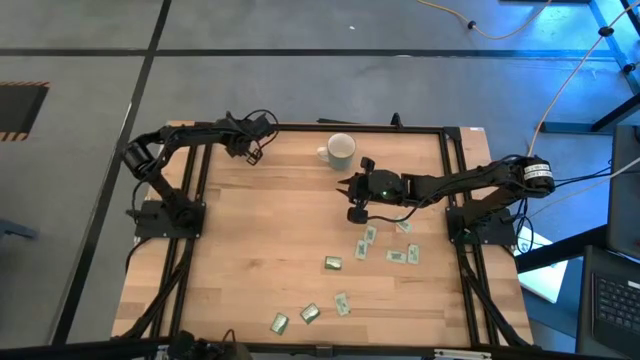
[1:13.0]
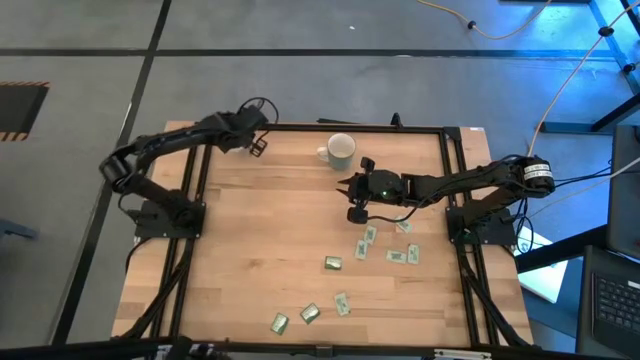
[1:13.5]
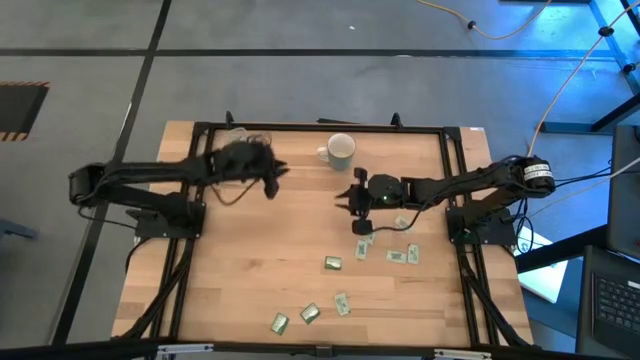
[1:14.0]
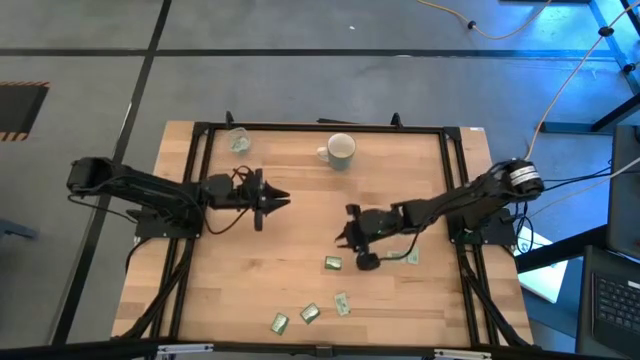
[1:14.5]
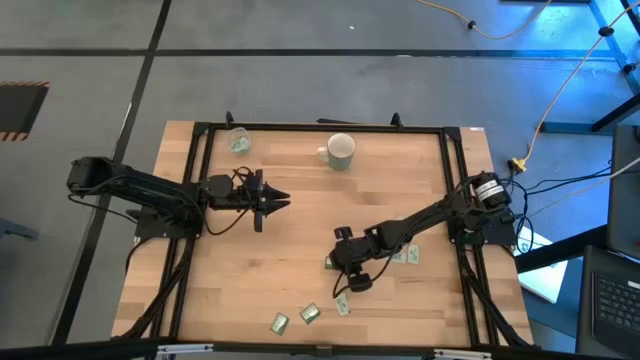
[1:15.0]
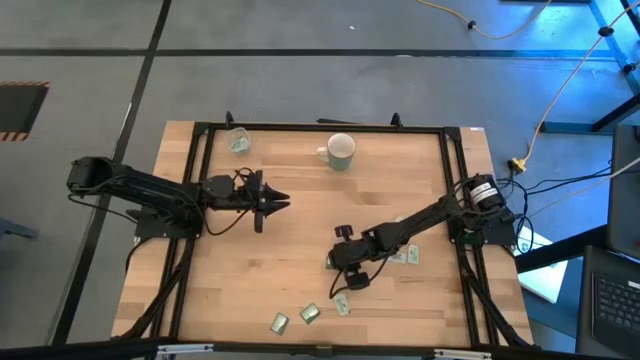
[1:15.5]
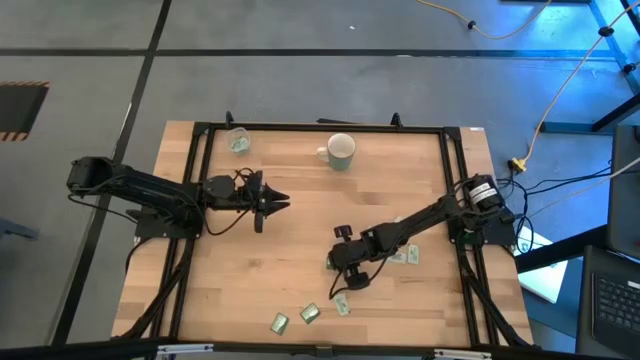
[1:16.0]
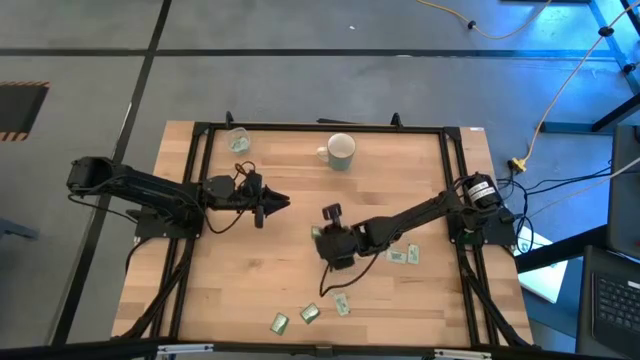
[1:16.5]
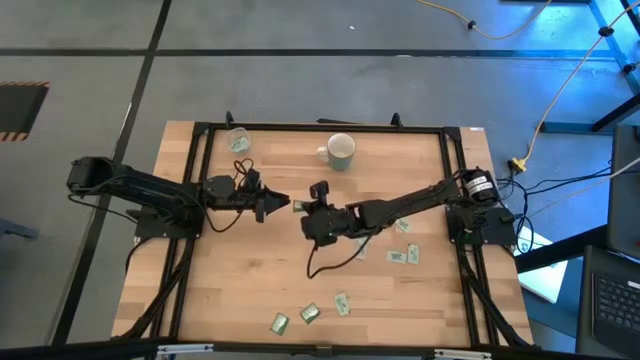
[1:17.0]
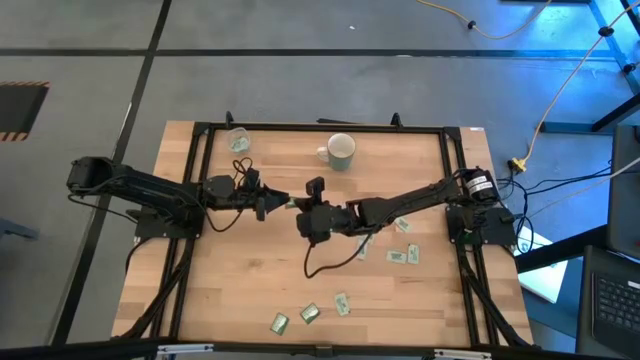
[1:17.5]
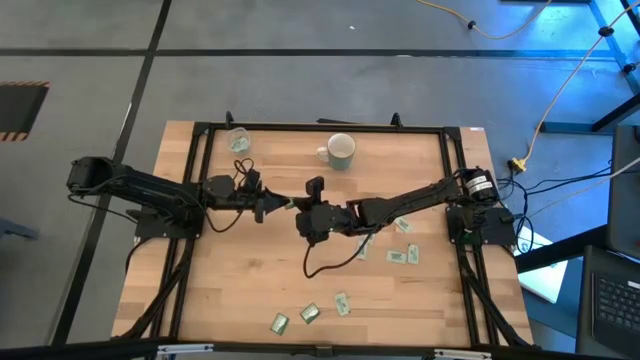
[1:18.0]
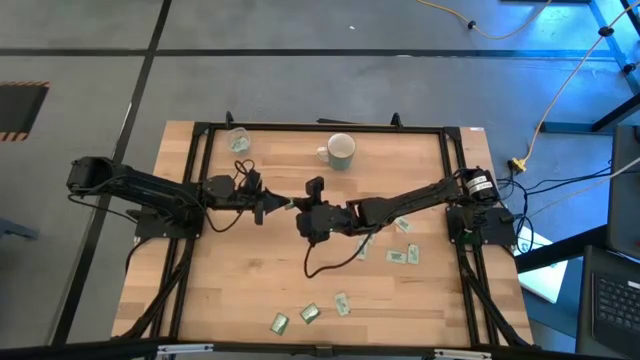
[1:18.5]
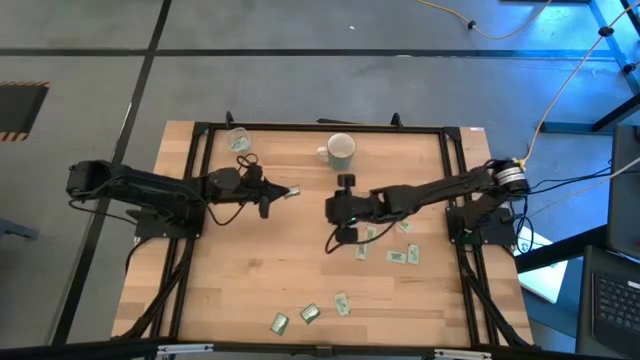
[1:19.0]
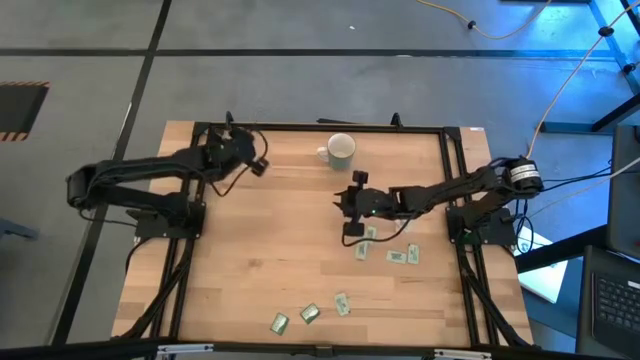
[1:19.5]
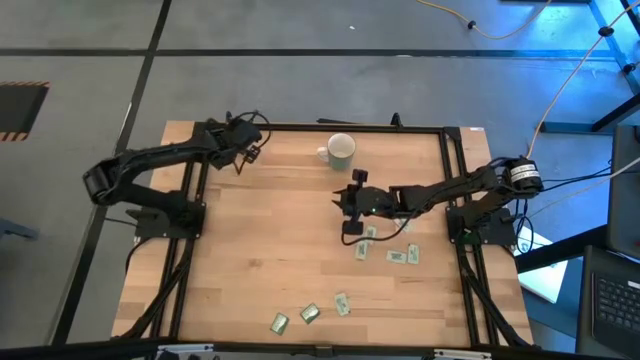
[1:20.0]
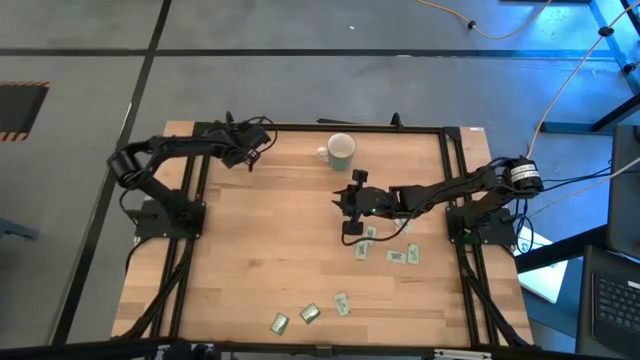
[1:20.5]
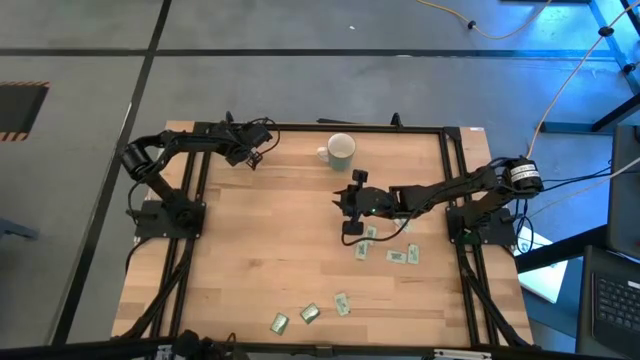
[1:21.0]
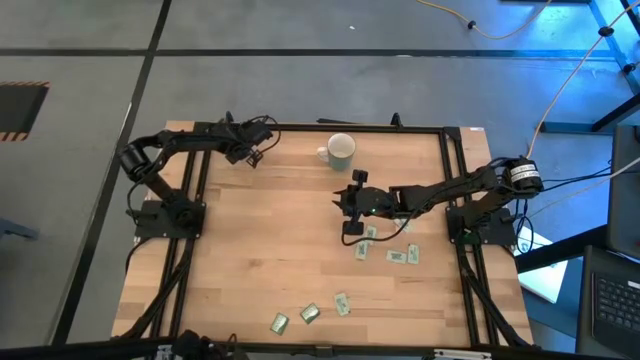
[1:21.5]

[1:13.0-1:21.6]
Task: Pick and place Stevia / Truvia into bins
Put the truvia packet into the transparent bin

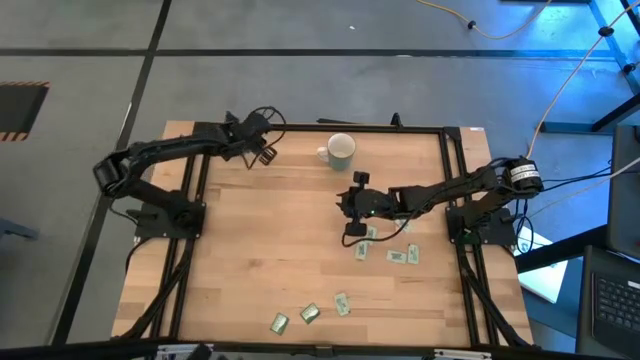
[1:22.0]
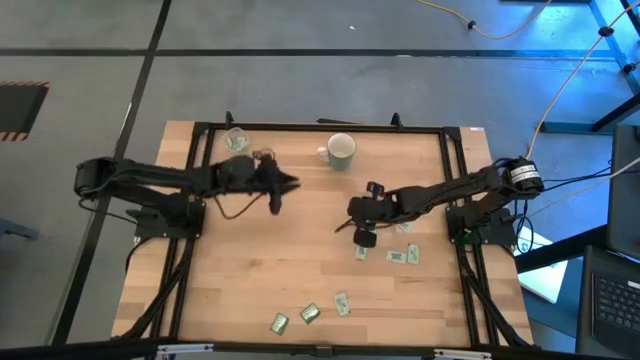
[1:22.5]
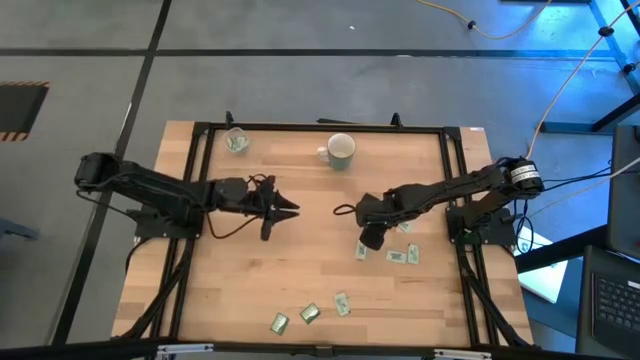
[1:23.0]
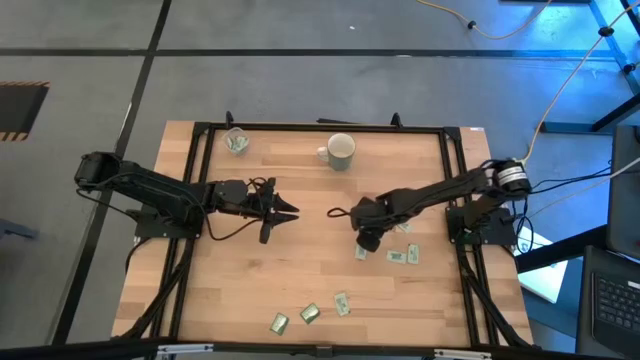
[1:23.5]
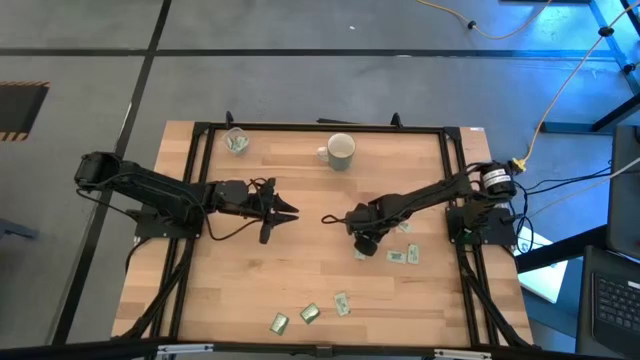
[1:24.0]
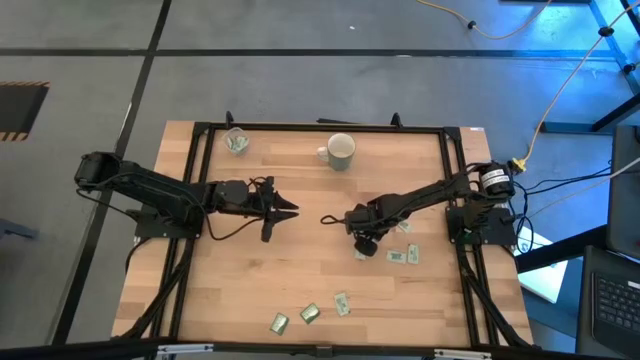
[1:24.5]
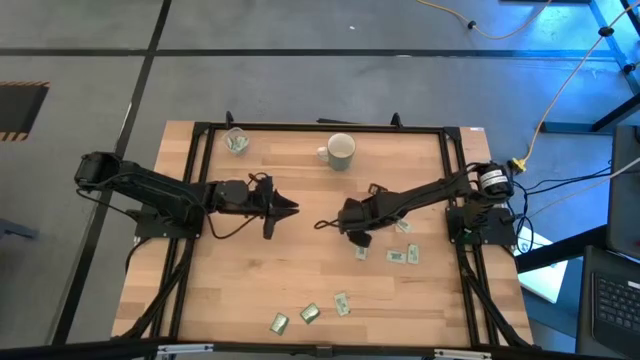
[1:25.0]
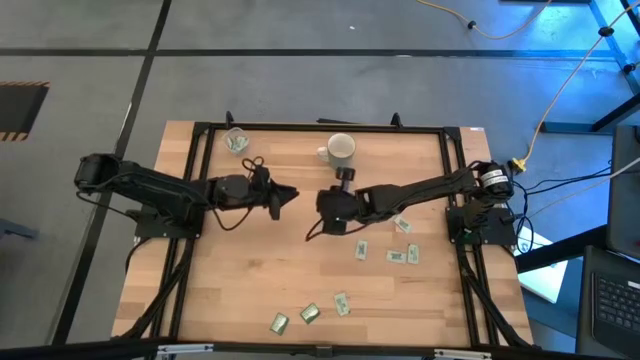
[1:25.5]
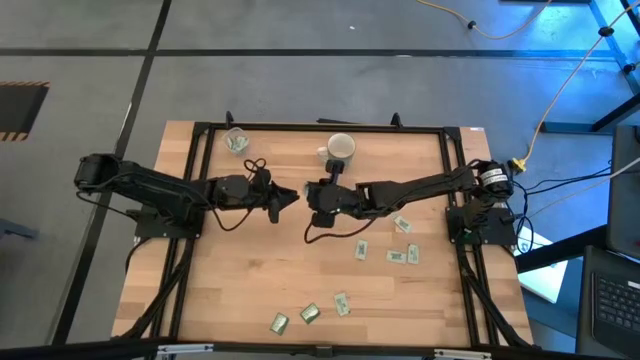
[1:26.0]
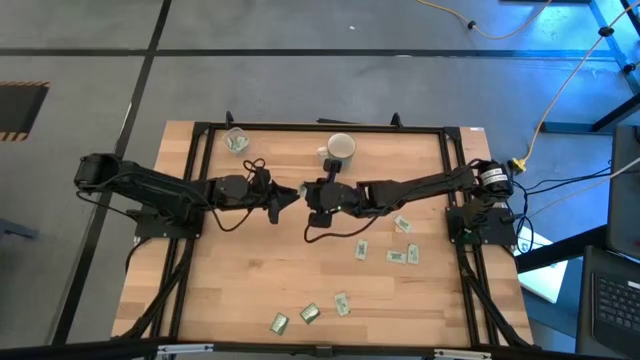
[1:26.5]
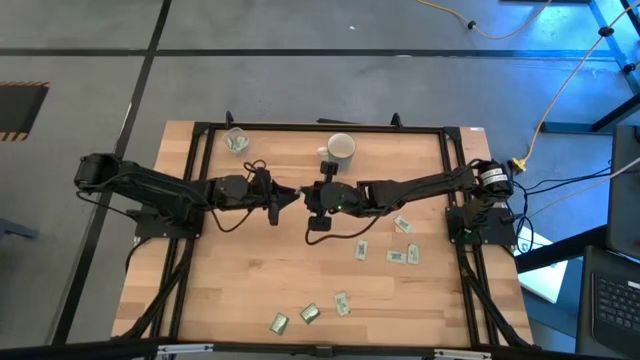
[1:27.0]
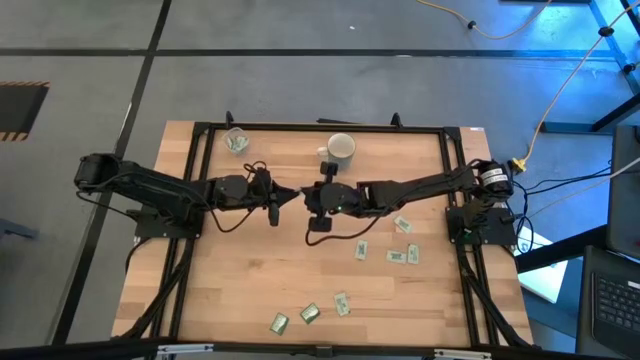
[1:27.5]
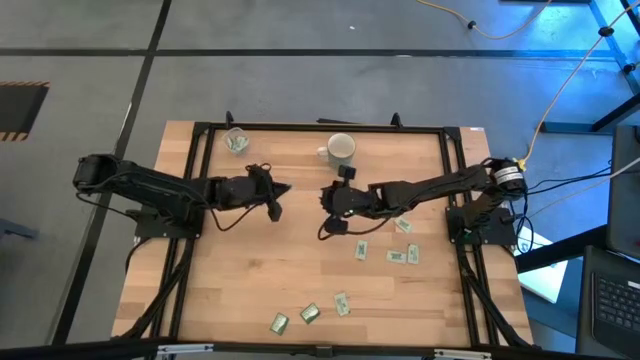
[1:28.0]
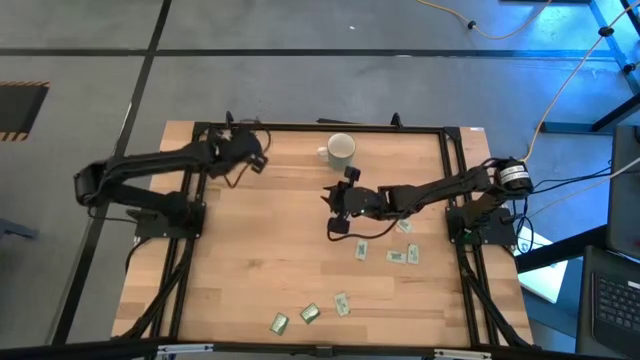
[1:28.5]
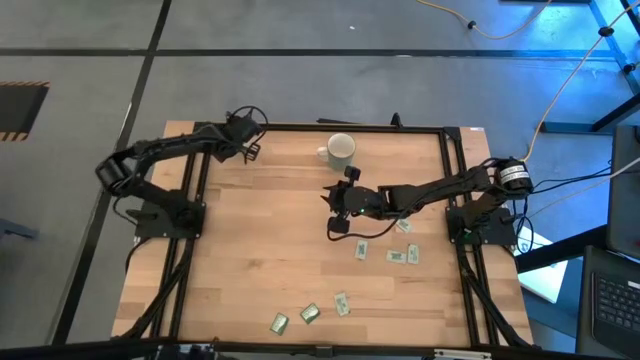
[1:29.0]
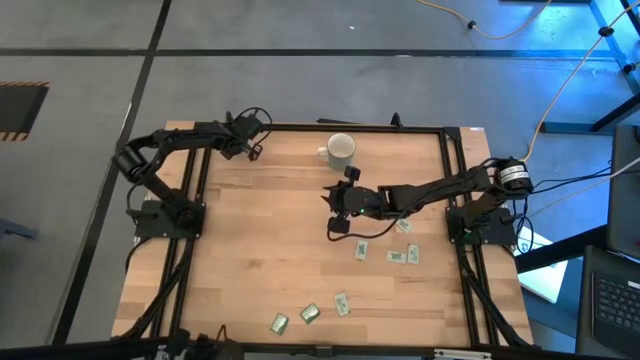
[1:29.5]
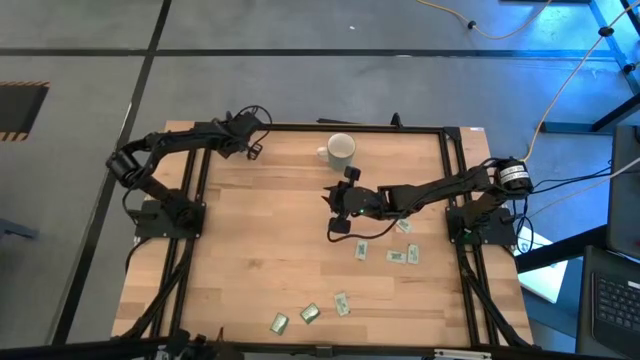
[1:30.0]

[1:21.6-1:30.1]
Put the stevia packet into the transparent bin

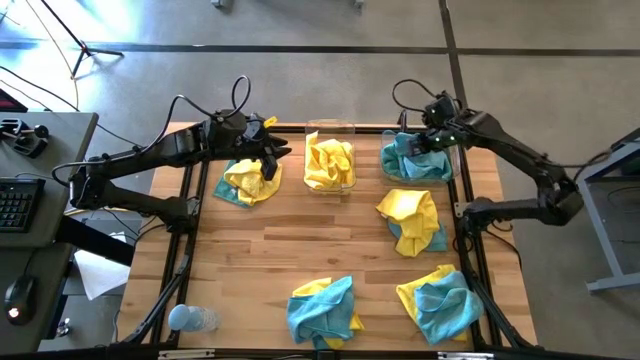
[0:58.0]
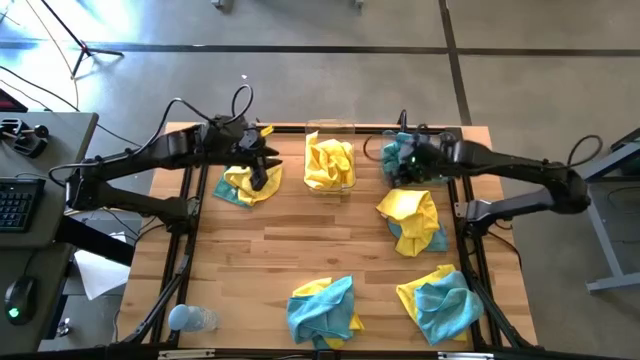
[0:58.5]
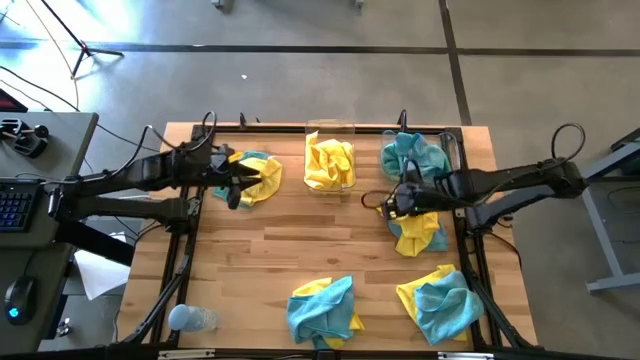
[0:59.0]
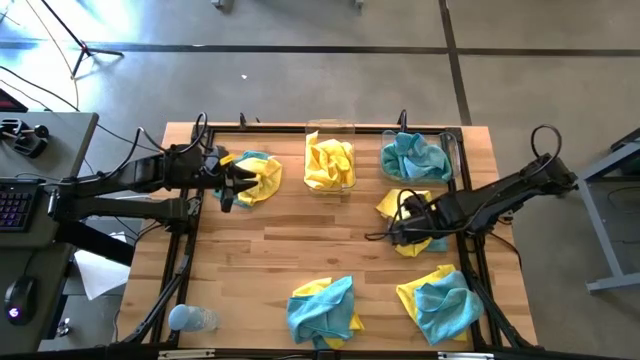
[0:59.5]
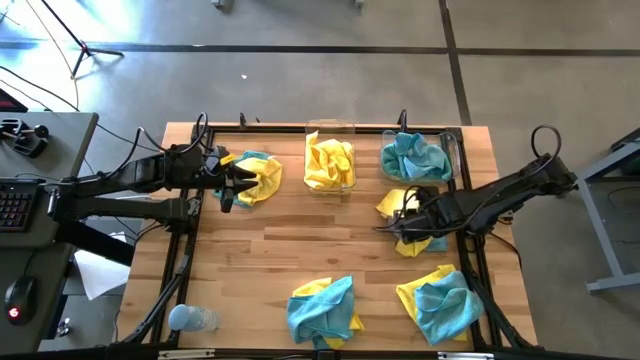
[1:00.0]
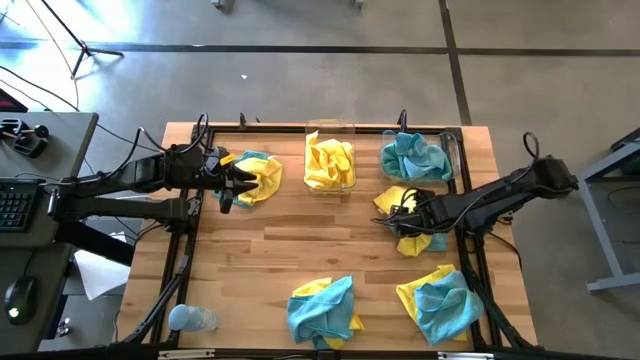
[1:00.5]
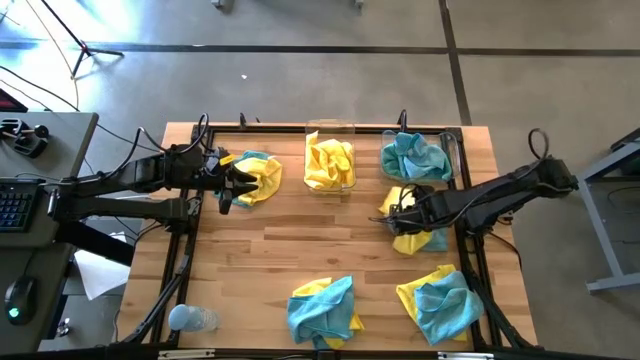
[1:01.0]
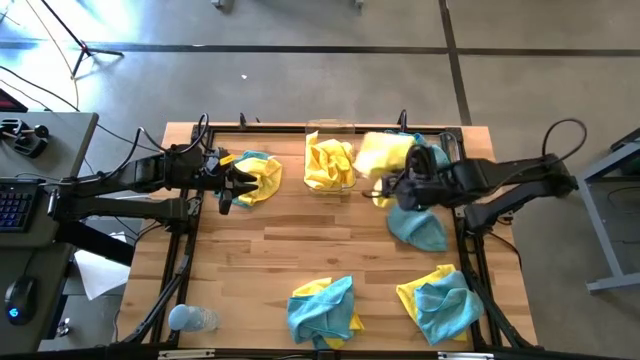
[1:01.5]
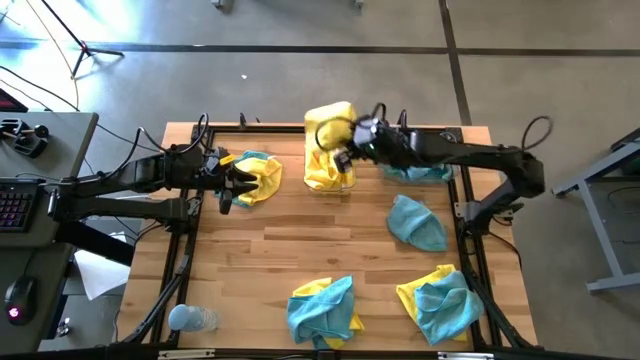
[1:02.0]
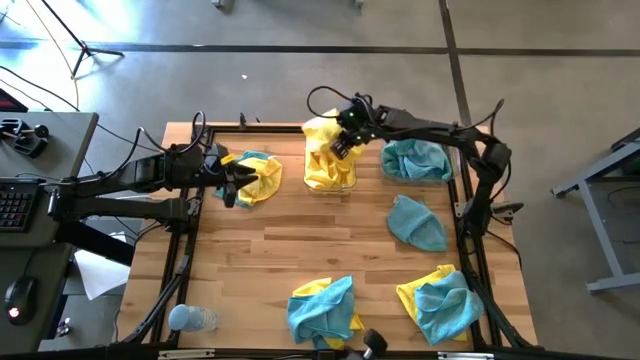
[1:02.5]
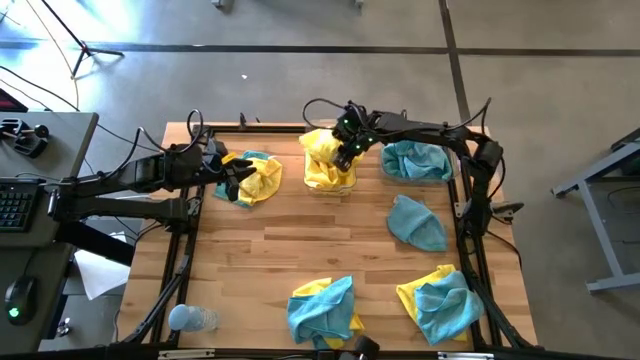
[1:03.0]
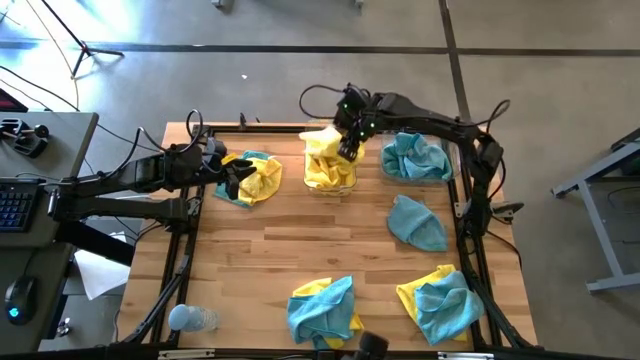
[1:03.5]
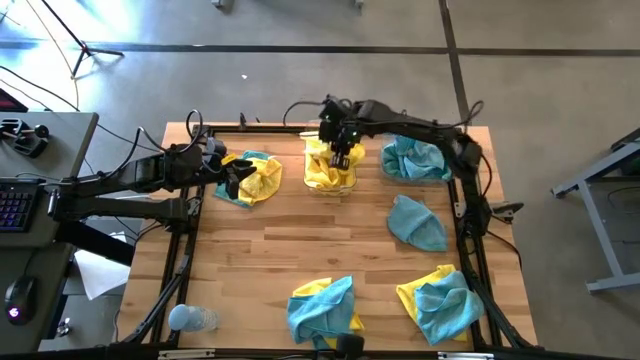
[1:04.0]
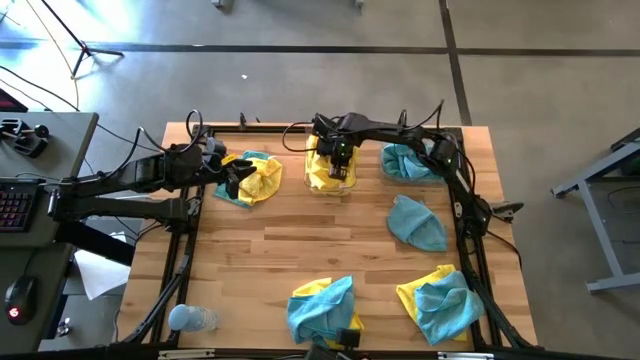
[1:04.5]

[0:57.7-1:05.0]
Task: Sort microfiber towel by color & place in baskets
Put the yellow towel into the left transparent bin
